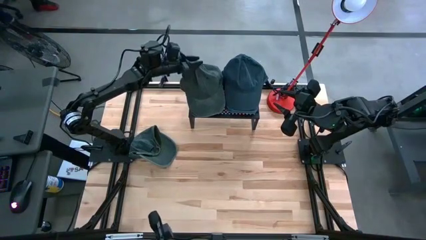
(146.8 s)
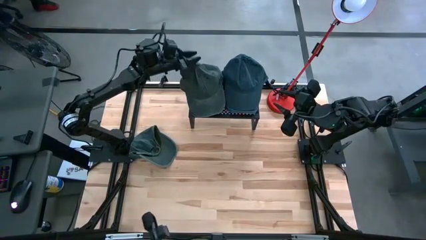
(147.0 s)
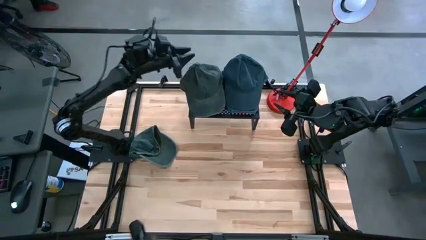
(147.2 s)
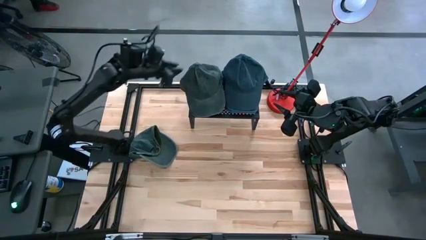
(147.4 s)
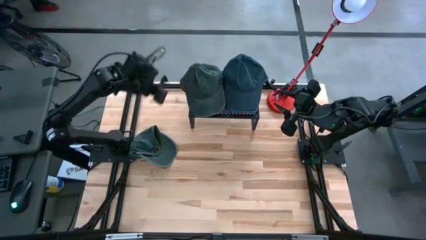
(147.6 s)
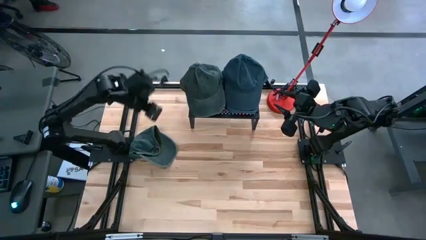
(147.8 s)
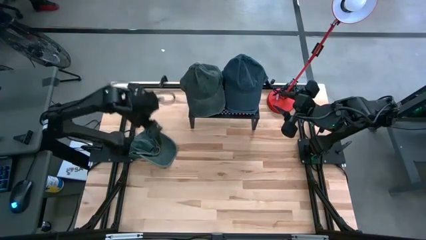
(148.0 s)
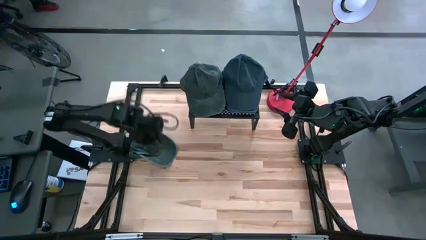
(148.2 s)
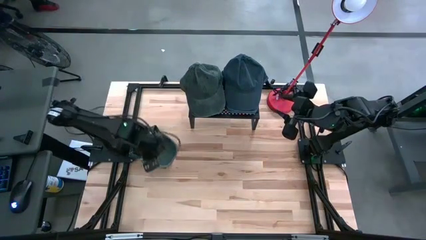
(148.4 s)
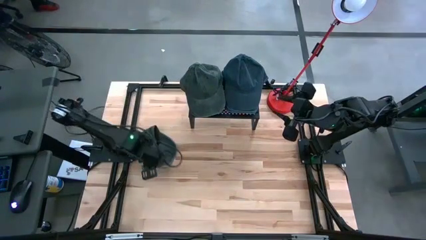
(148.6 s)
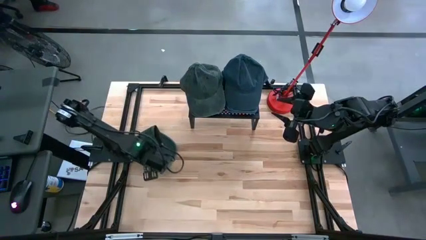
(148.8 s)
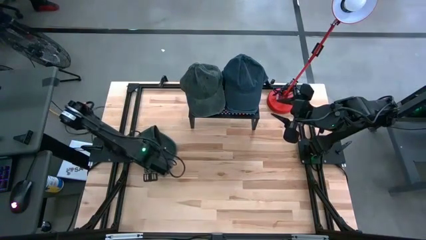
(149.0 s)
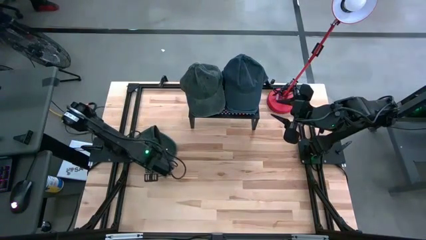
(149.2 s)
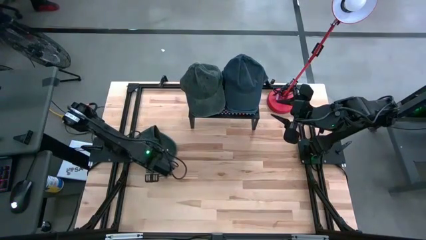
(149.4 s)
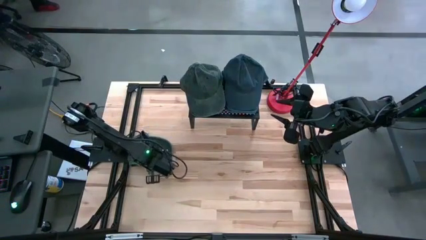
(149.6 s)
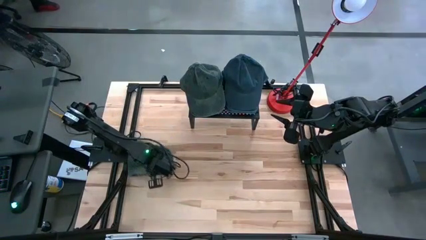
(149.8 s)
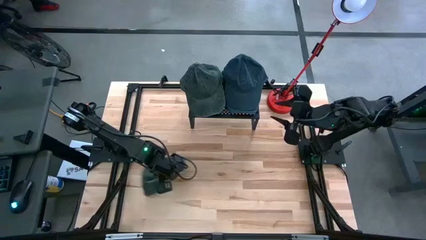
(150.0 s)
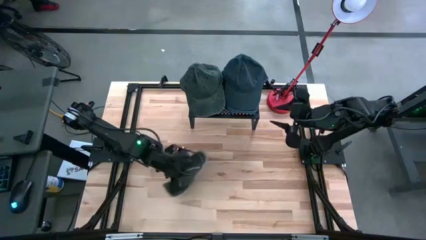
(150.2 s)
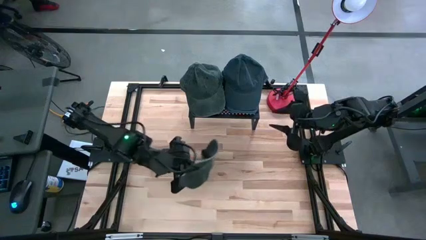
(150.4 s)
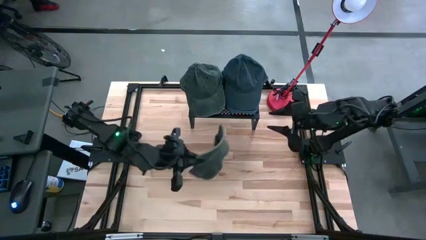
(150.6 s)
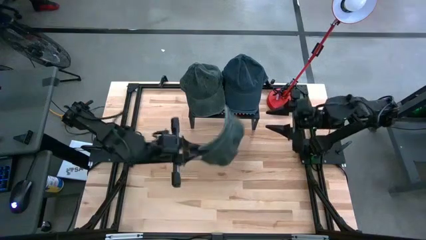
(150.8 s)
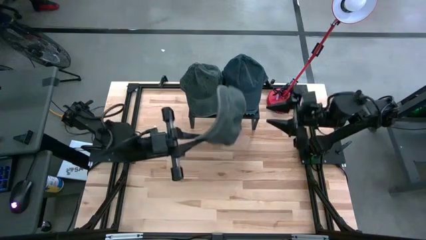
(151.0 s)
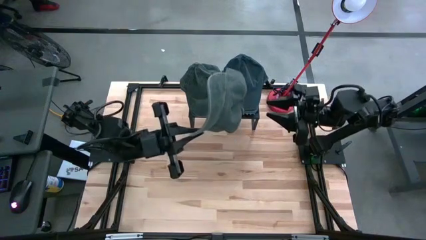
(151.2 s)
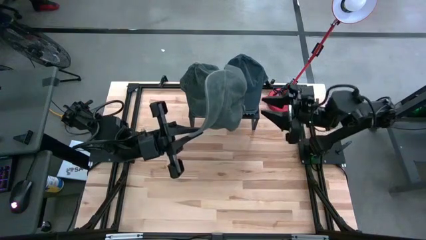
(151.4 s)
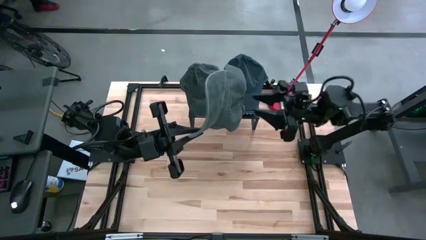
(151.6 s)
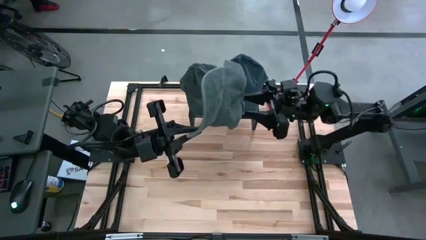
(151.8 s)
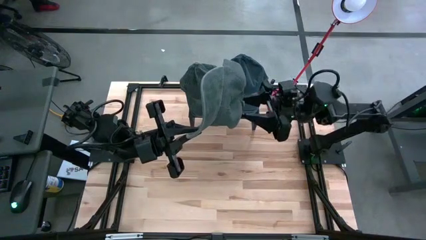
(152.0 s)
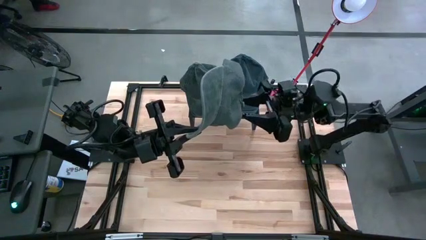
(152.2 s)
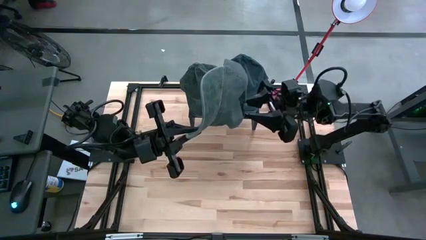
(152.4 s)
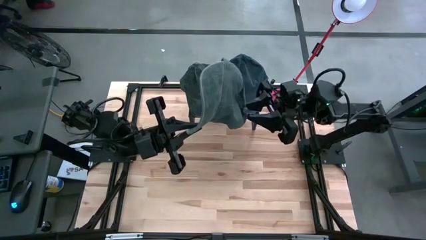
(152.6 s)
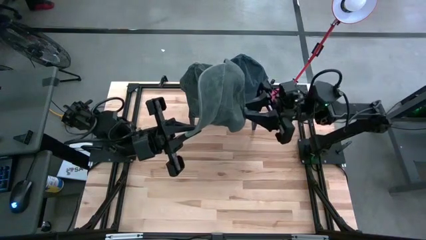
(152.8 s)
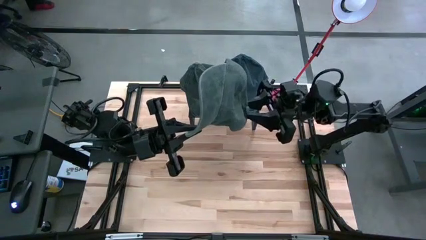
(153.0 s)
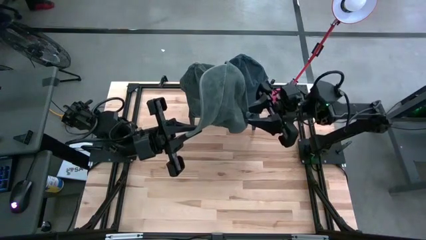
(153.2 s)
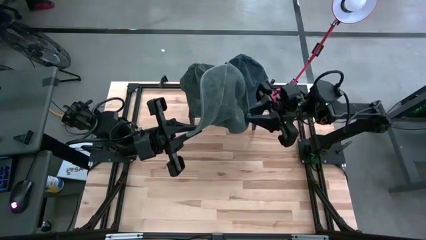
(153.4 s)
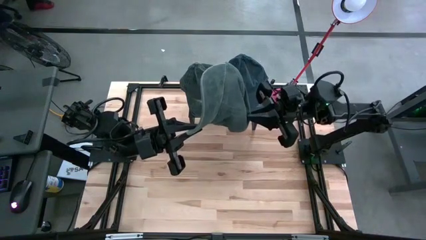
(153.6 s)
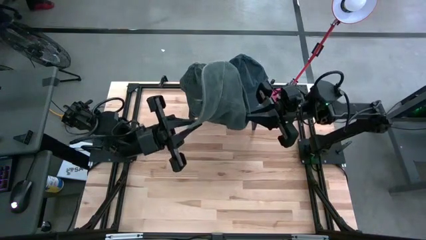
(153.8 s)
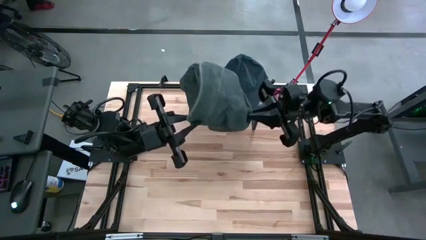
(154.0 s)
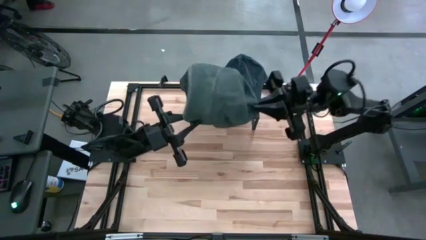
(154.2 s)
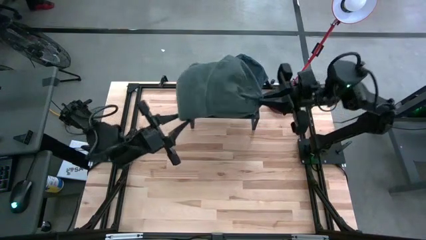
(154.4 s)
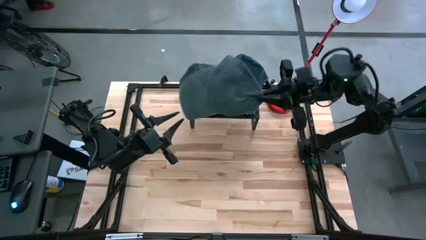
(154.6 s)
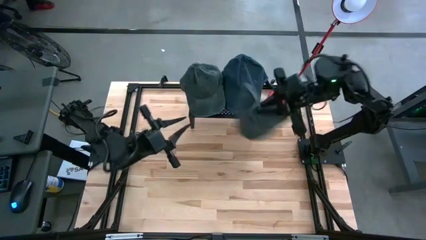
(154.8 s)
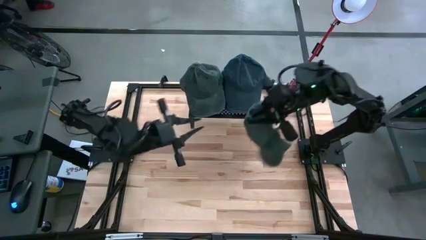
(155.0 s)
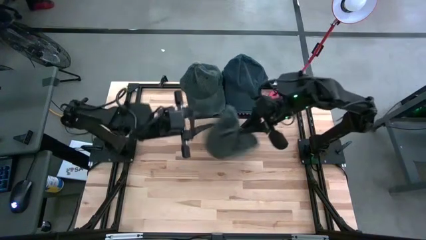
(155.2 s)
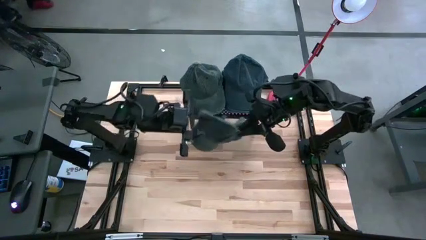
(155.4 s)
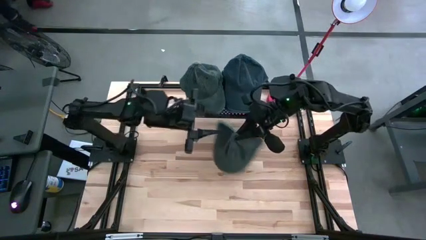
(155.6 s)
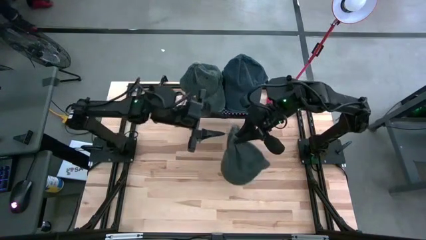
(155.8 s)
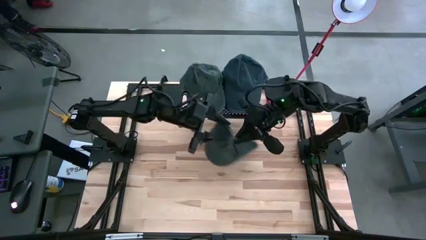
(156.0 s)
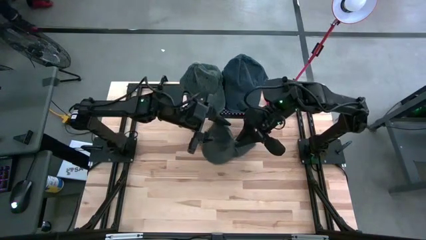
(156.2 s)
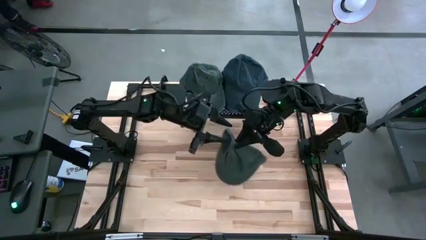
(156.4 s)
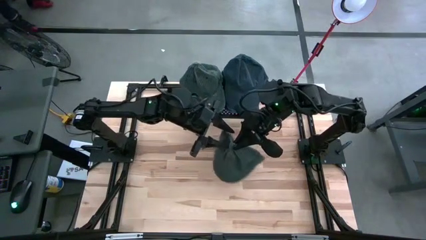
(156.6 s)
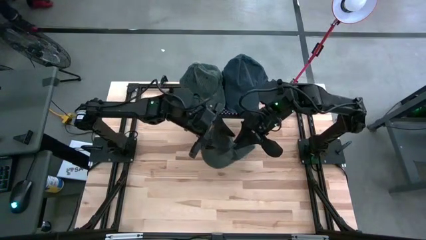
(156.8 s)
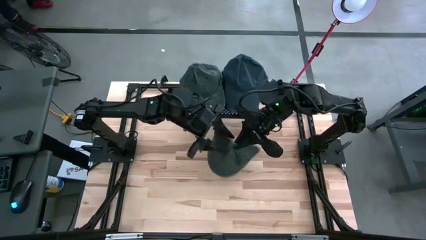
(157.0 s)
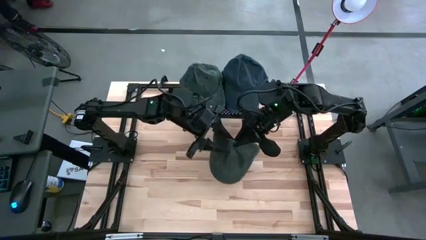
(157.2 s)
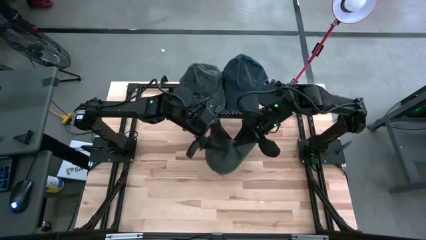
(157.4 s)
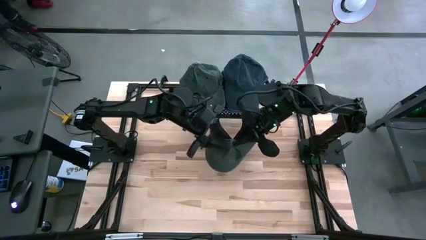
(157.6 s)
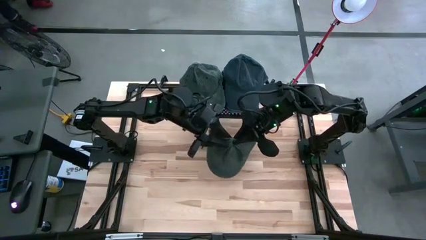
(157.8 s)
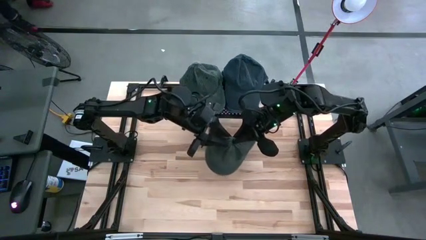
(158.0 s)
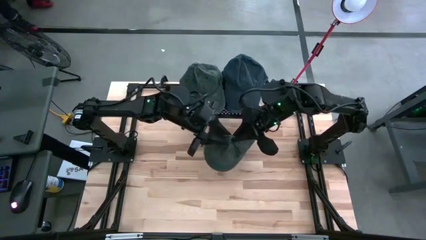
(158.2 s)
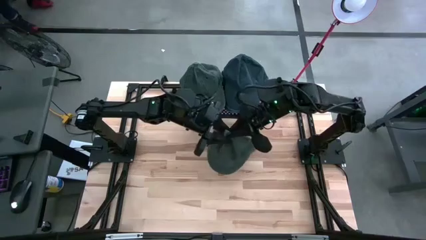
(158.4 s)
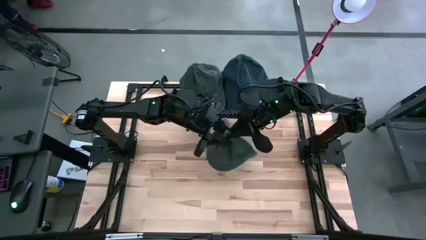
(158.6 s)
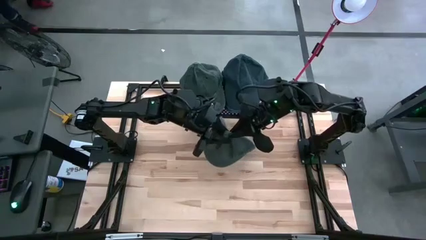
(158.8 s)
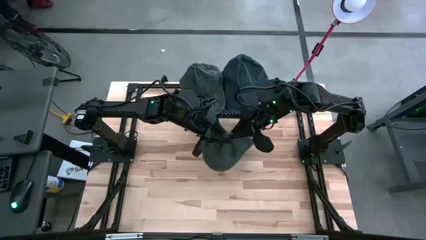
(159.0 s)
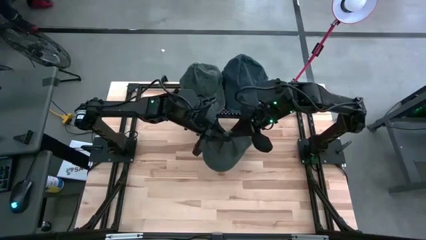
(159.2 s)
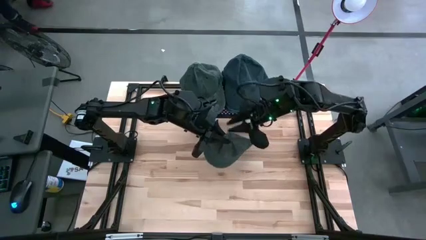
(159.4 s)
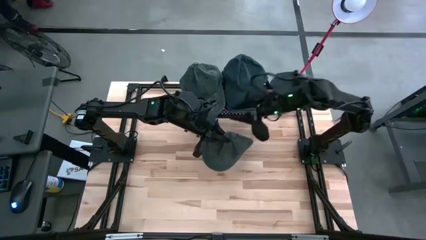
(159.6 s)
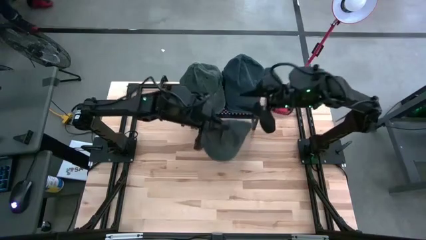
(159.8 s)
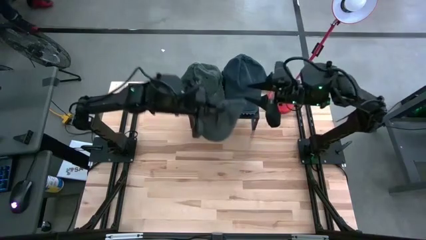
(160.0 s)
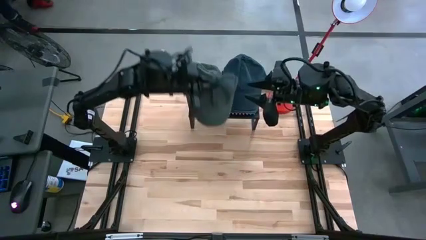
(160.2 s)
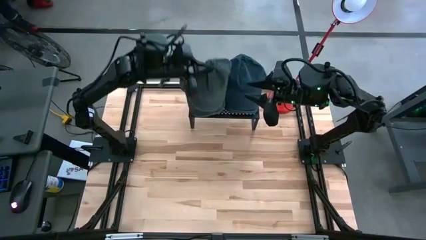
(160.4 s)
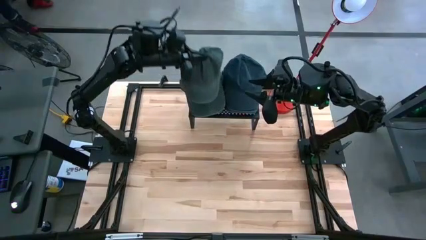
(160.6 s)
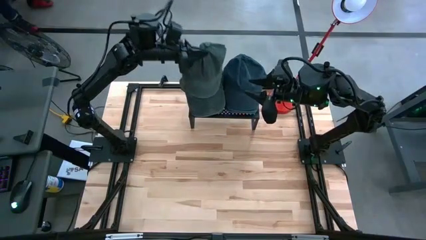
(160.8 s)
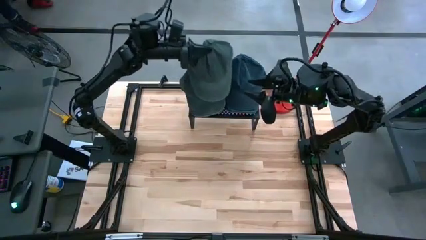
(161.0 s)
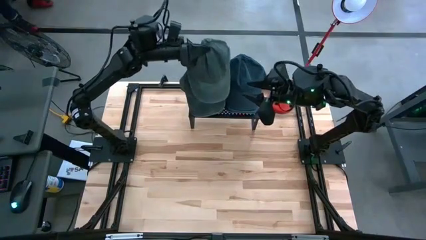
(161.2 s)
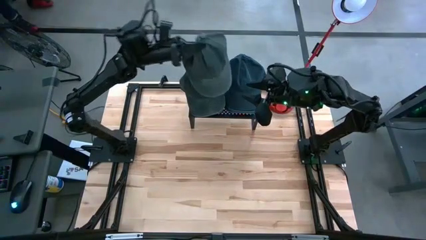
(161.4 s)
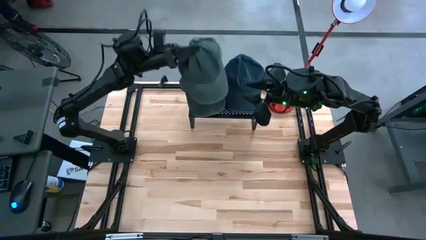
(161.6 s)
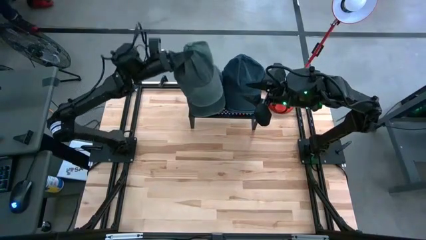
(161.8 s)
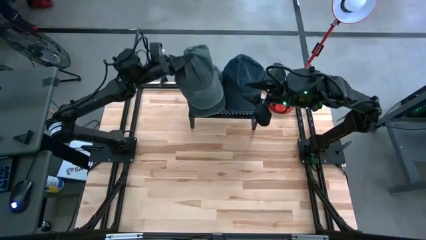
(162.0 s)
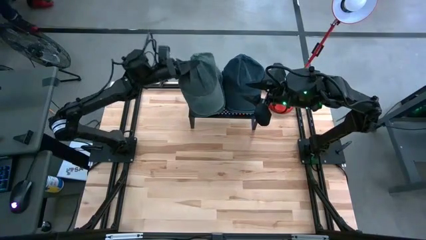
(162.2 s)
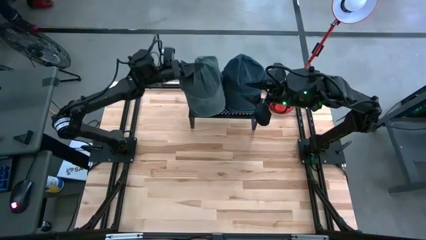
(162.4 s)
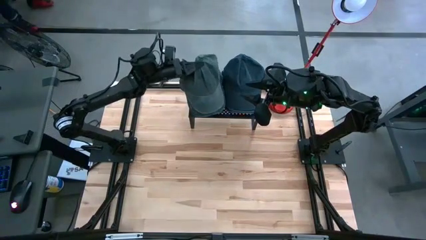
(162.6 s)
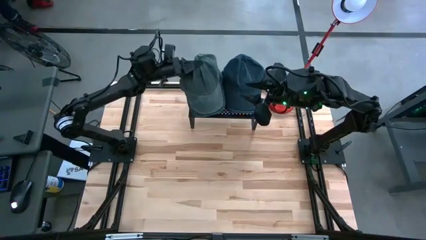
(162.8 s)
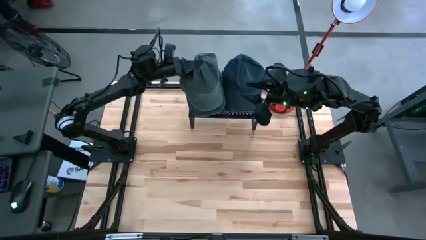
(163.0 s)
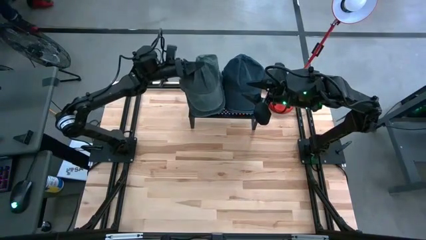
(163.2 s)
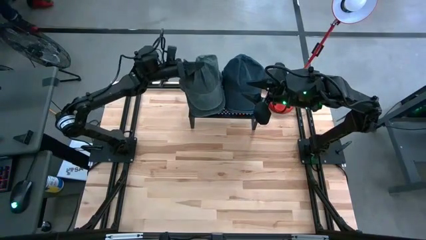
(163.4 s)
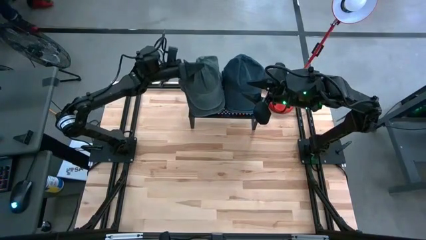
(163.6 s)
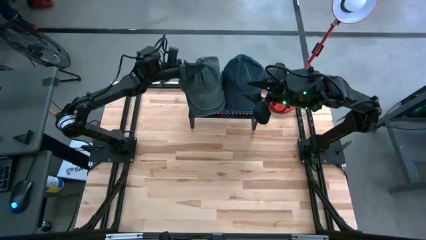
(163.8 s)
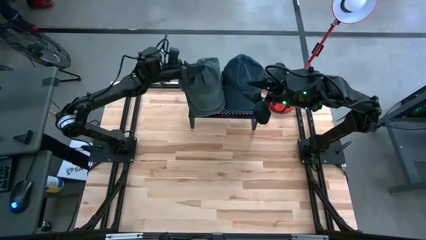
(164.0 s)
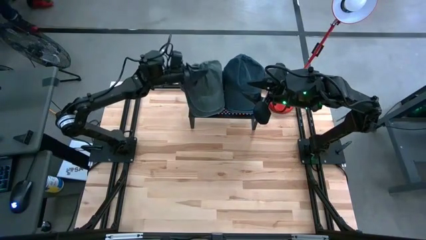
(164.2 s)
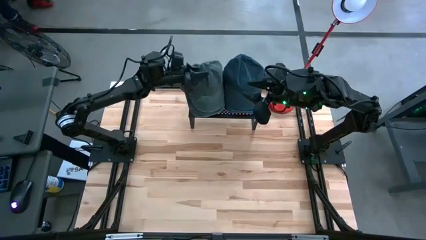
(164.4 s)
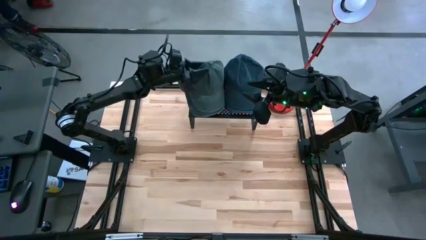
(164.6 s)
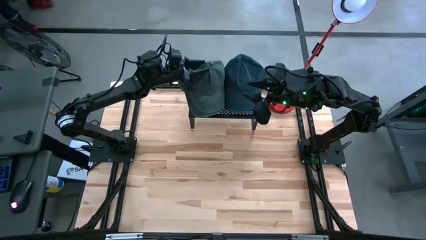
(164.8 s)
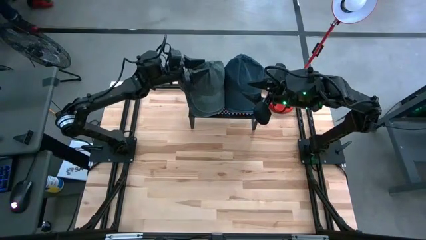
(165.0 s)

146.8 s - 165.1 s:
Task: Pick & Place hat
Stack the dark green cap on top of the other dark green caps on the shelf
